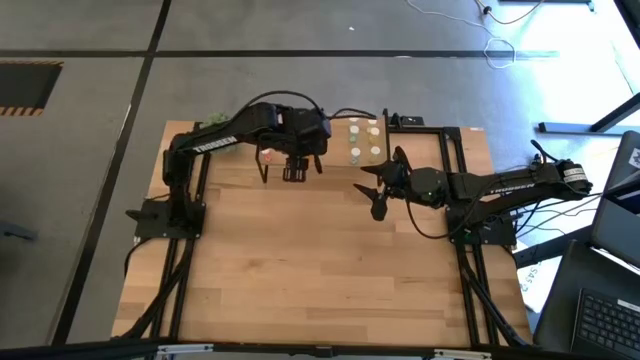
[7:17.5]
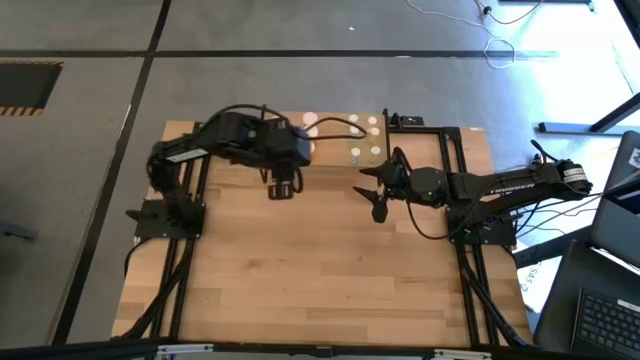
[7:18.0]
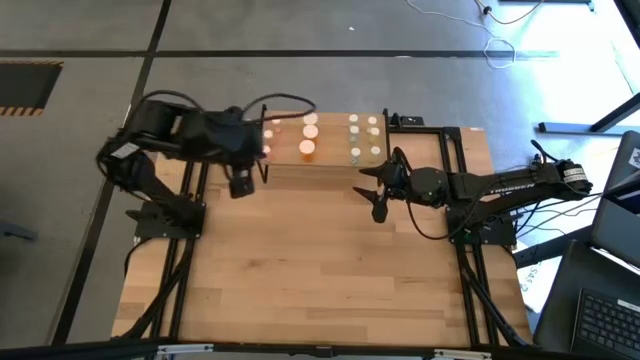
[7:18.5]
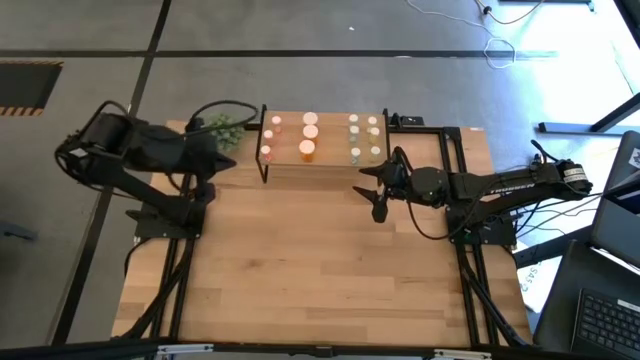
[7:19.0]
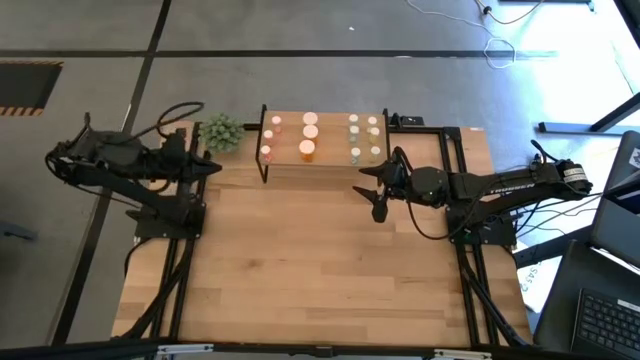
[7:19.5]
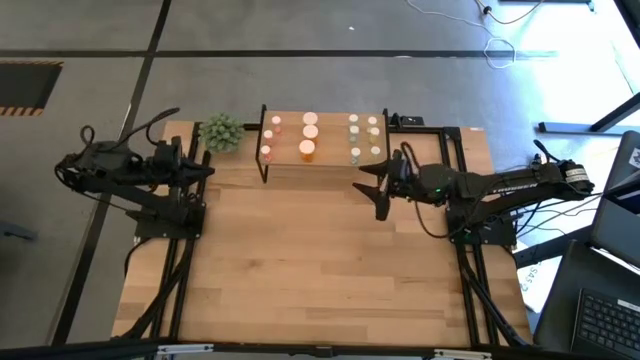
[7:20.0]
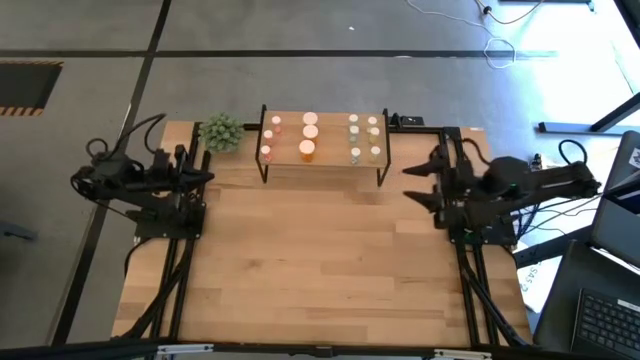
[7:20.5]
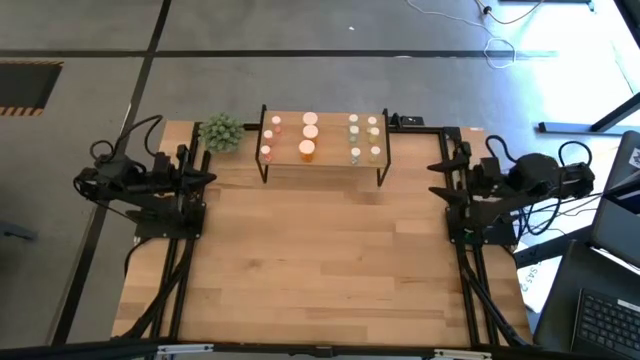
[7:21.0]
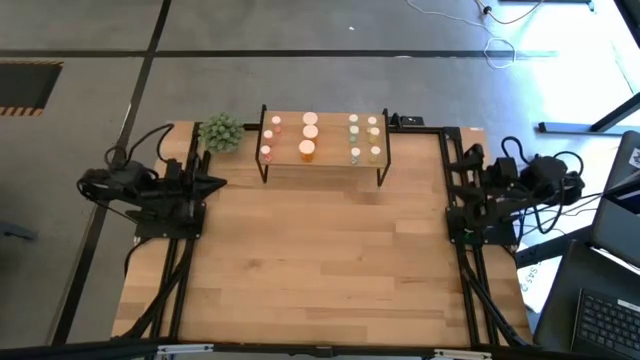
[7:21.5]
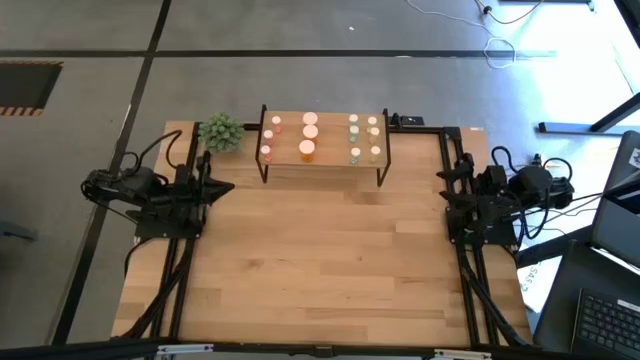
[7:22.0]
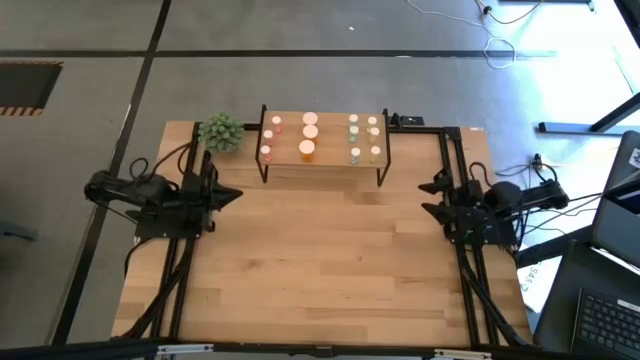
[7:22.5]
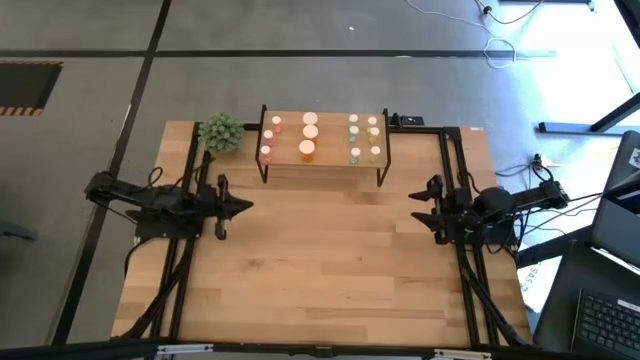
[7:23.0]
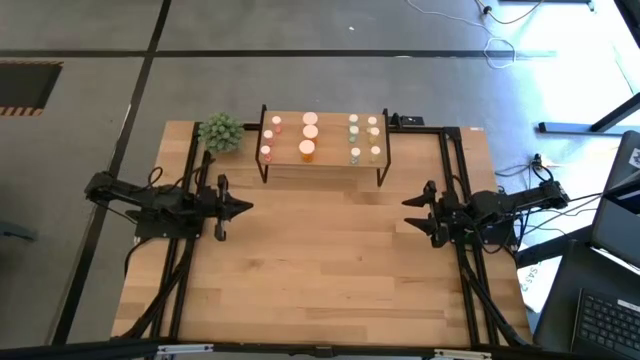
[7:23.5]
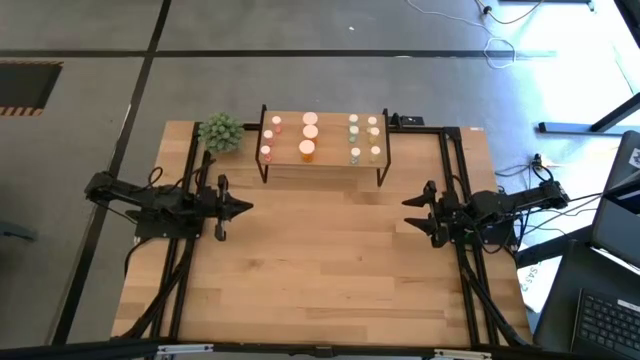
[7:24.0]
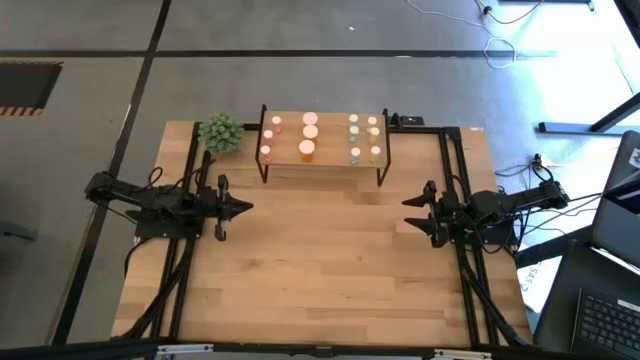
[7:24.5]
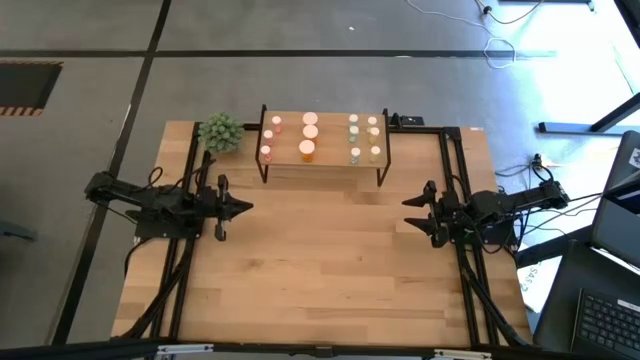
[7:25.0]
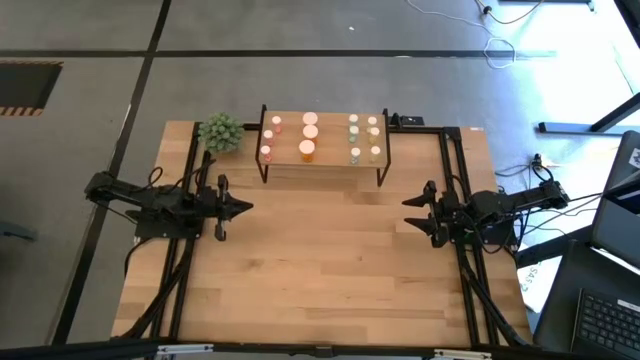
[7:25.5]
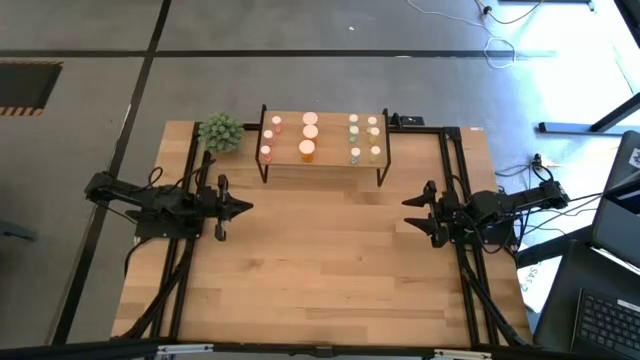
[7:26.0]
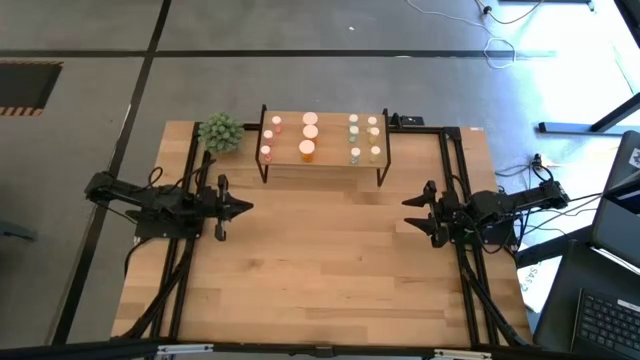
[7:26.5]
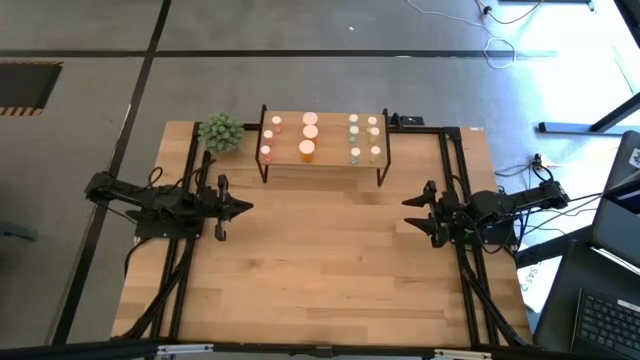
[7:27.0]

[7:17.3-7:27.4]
Task: Pick and place medicine bottles onto shelf by color
Return to Home Position

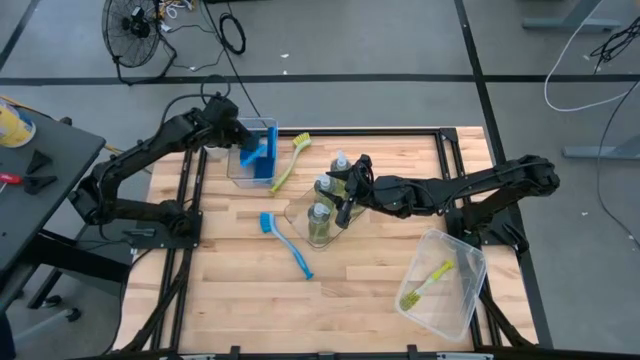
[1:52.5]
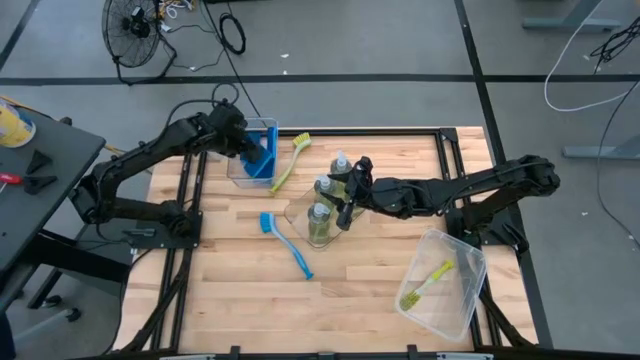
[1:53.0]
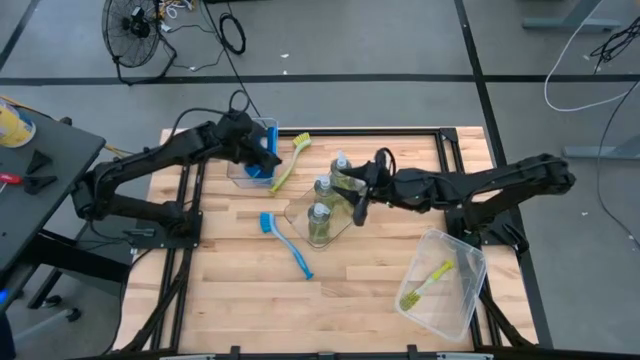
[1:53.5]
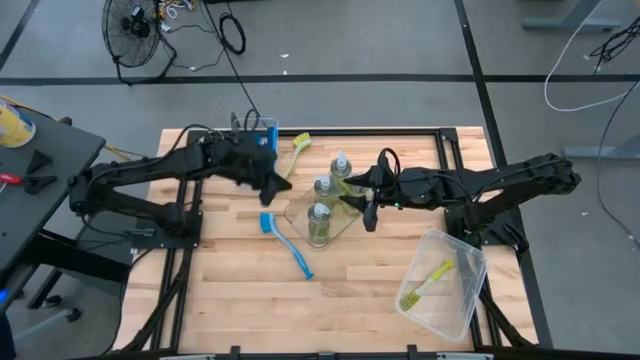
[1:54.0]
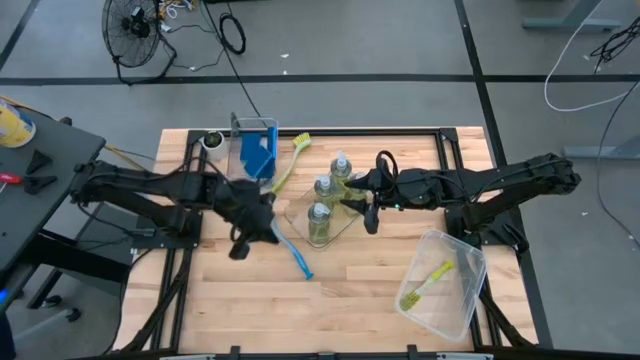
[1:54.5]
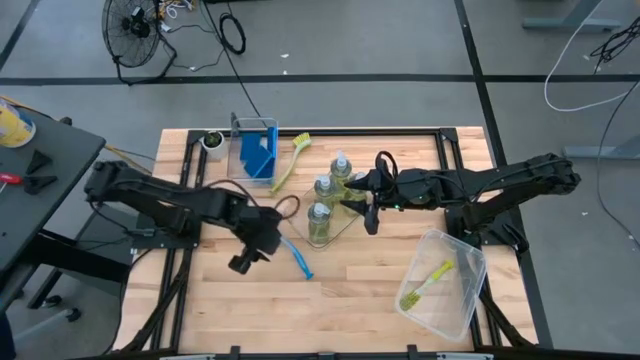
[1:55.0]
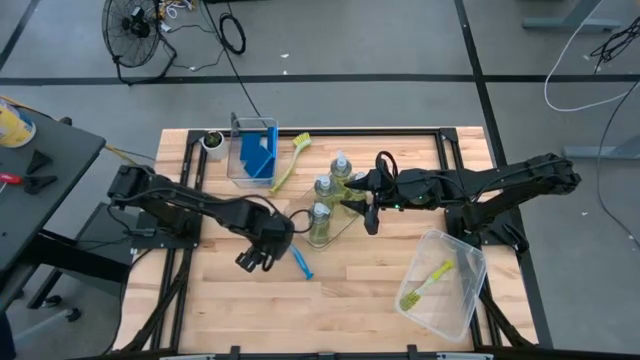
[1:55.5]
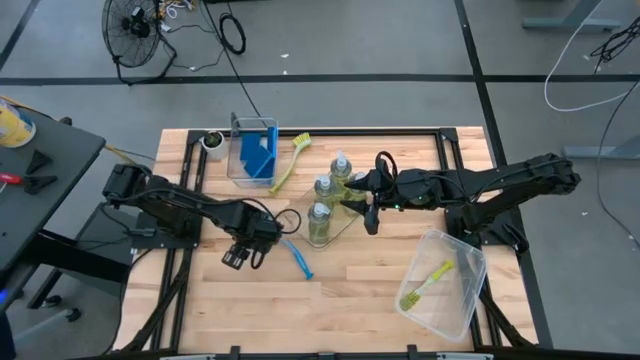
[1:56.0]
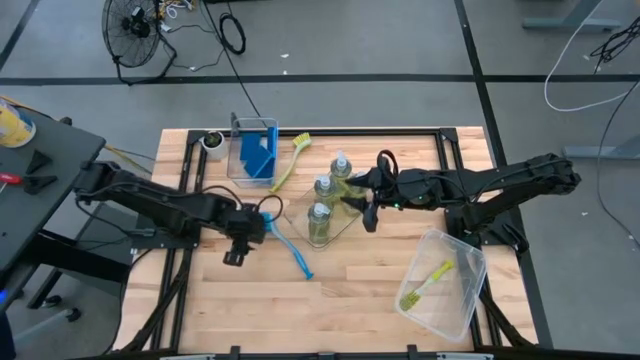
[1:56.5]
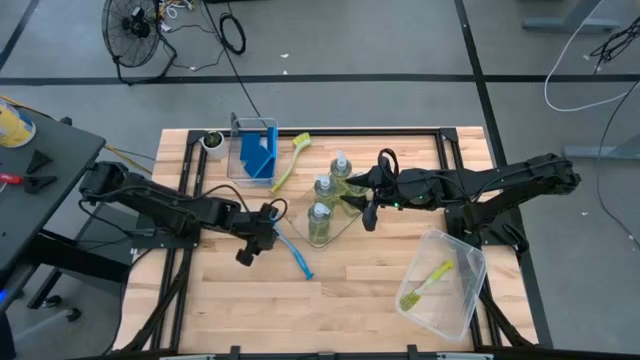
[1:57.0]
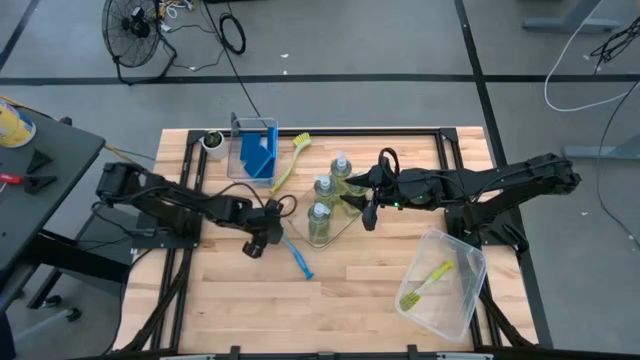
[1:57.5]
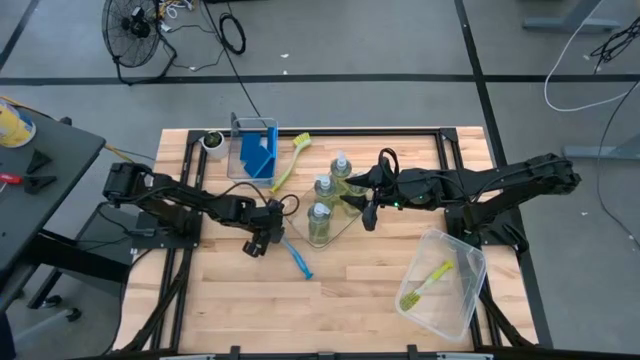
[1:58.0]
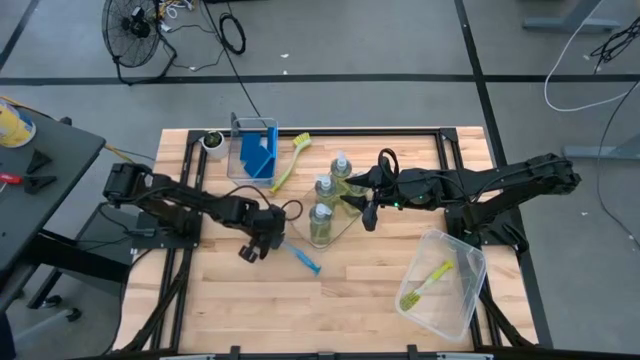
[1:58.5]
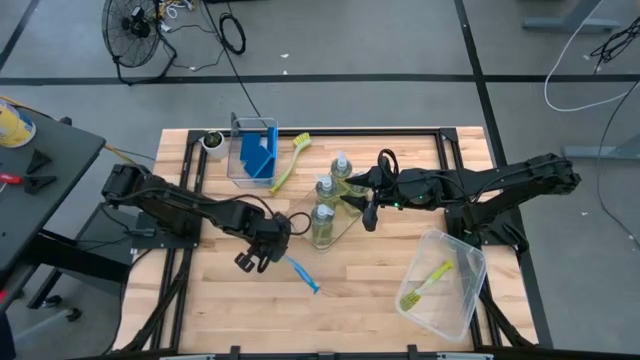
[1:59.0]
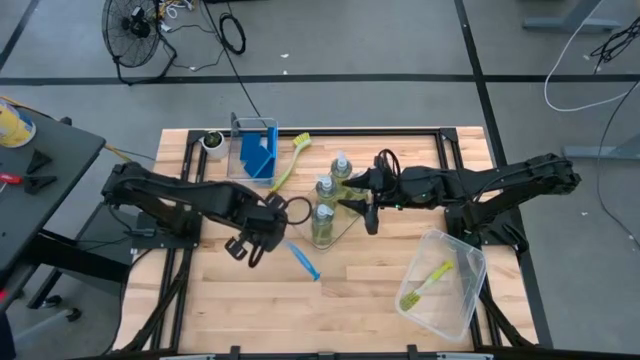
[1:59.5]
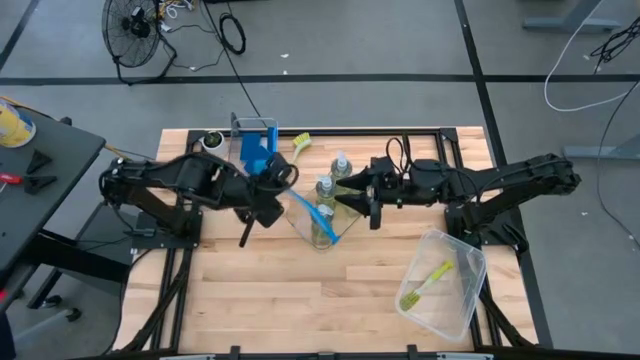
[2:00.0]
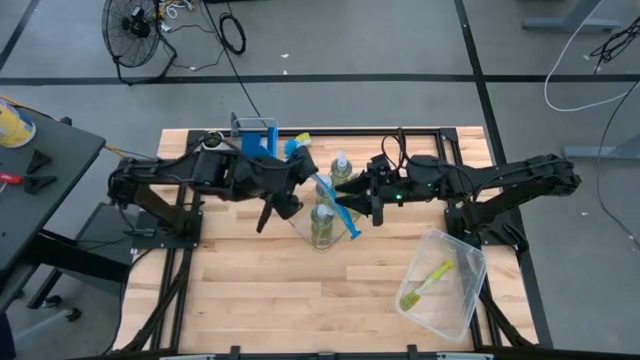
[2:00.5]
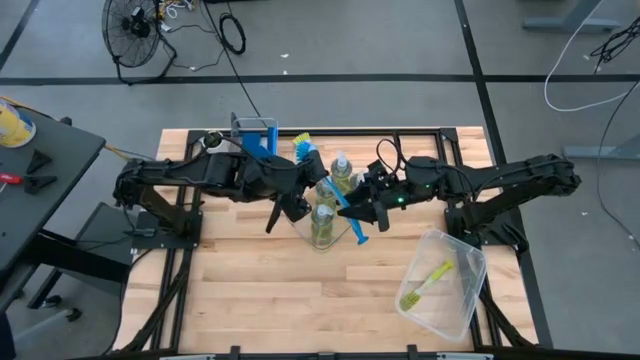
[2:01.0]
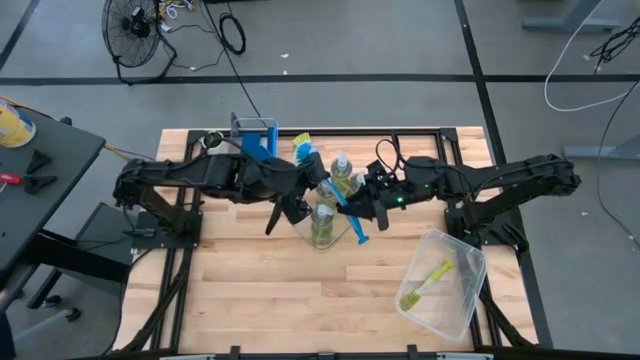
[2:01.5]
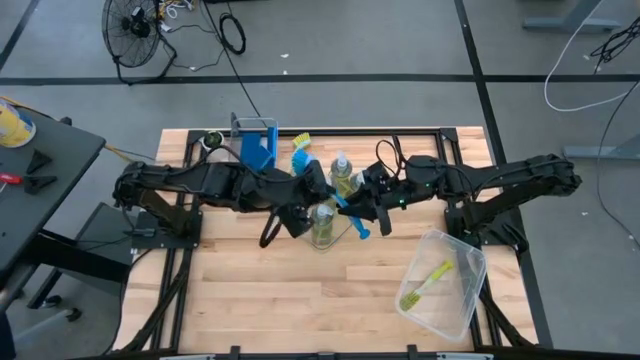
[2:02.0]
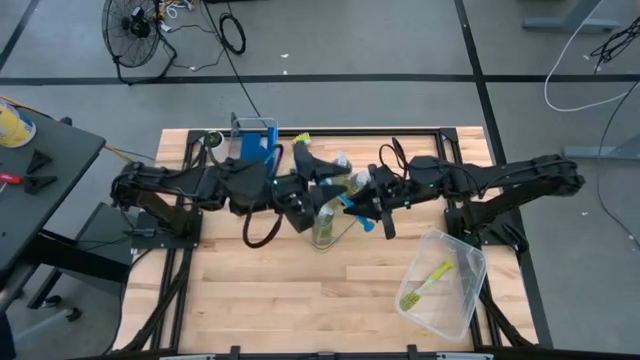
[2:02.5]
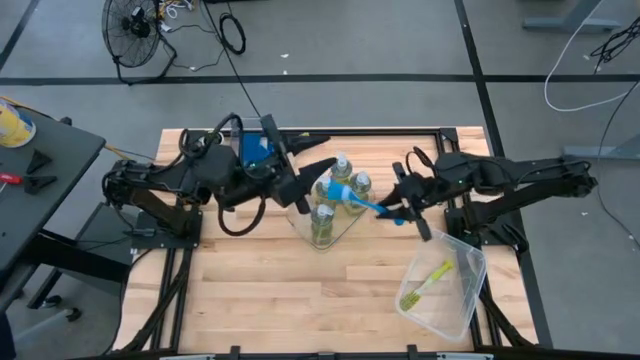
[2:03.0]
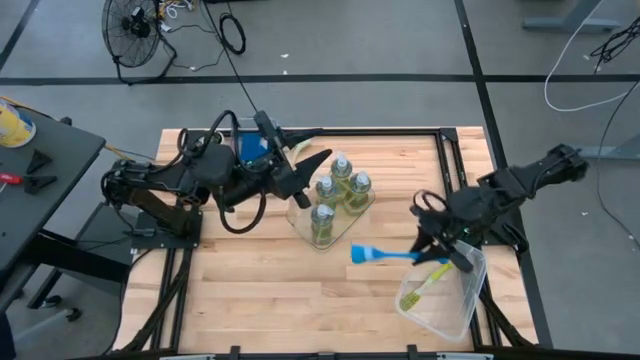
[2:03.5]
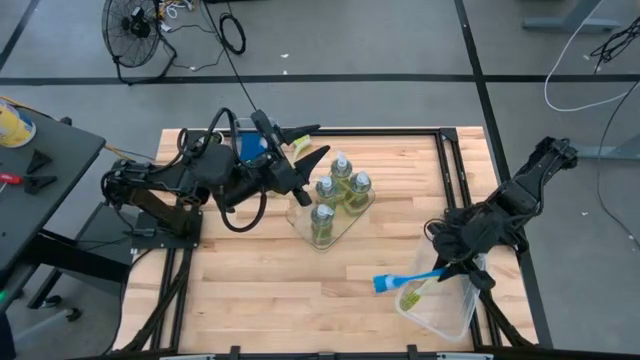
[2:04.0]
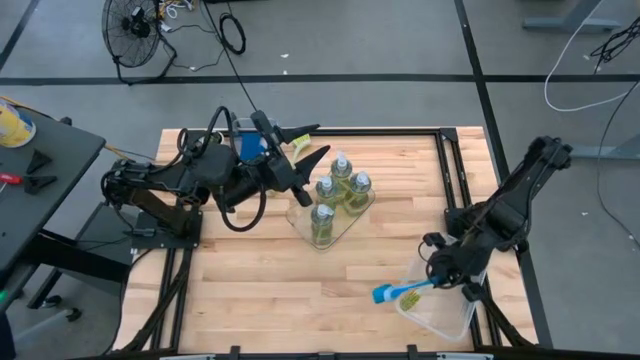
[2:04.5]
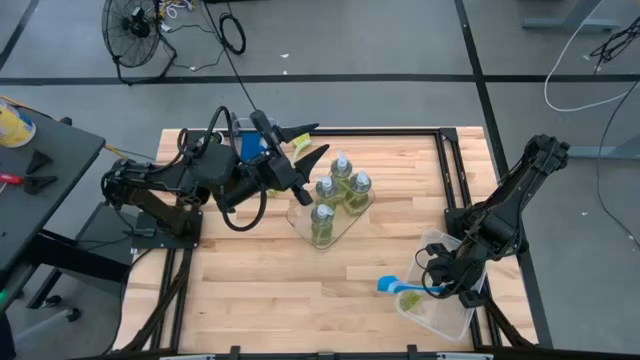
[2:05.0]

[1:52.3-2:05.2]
Task: Pick & Place Kitchen Sink Supplies
Put the blue toilet brush into the transparent container
